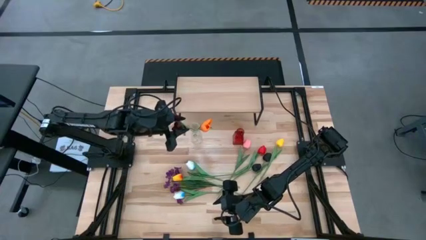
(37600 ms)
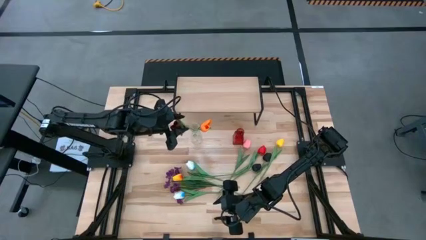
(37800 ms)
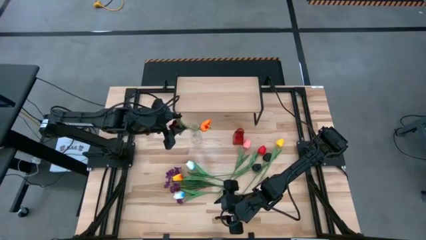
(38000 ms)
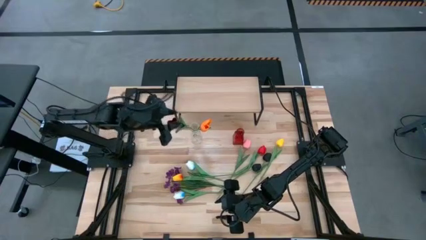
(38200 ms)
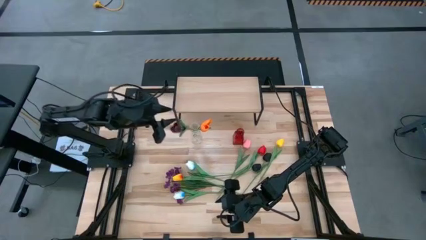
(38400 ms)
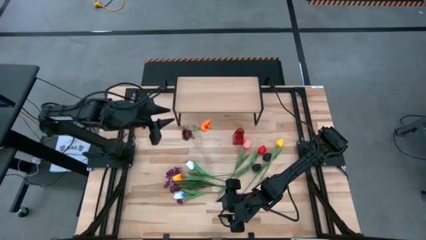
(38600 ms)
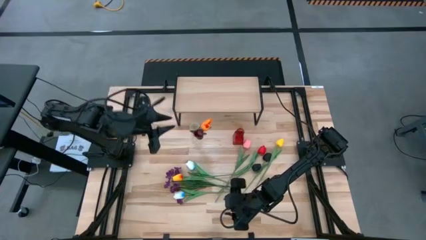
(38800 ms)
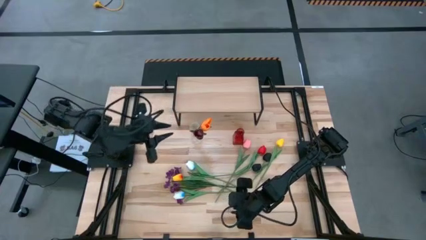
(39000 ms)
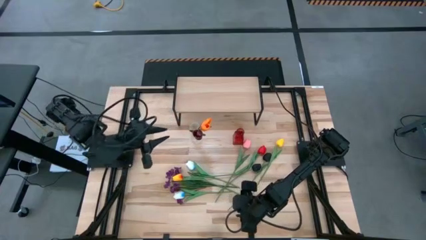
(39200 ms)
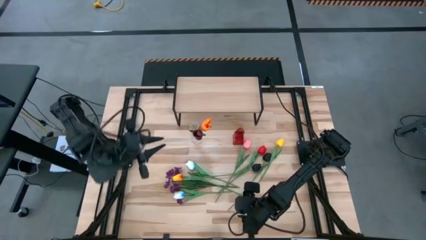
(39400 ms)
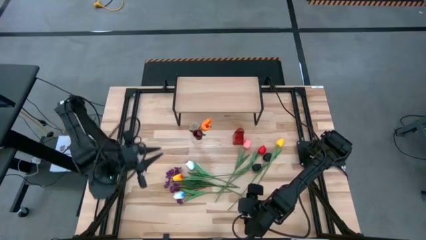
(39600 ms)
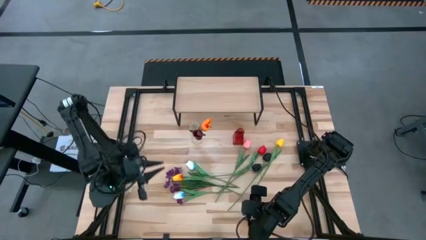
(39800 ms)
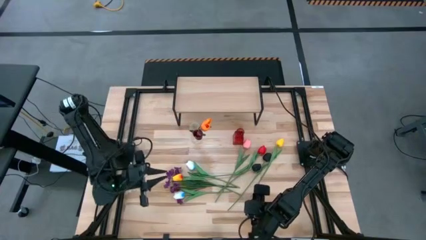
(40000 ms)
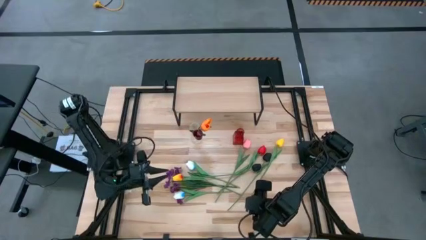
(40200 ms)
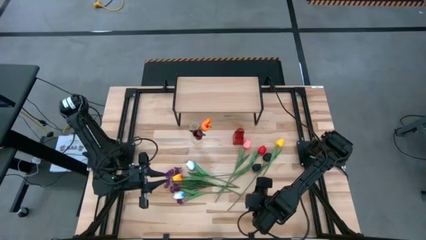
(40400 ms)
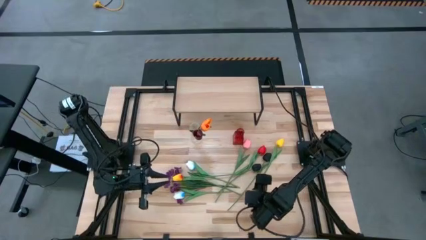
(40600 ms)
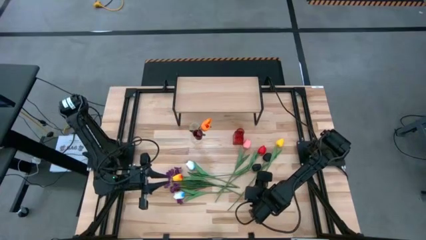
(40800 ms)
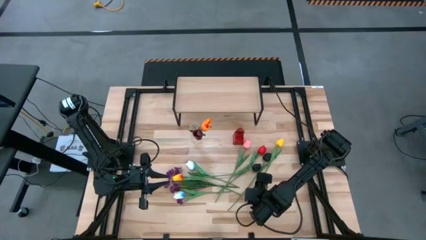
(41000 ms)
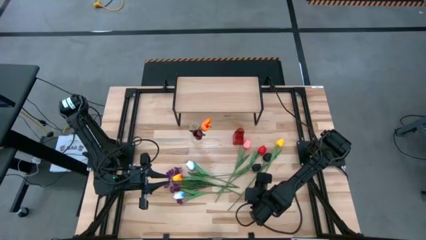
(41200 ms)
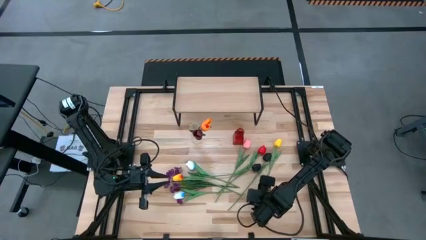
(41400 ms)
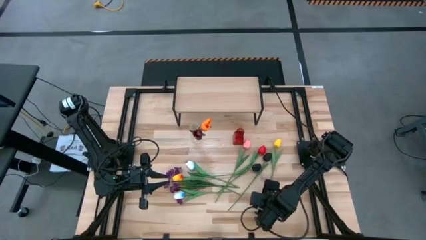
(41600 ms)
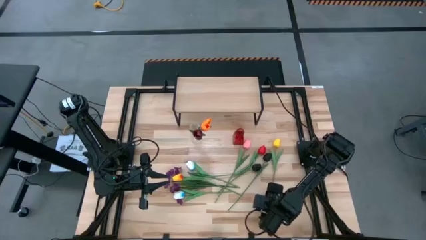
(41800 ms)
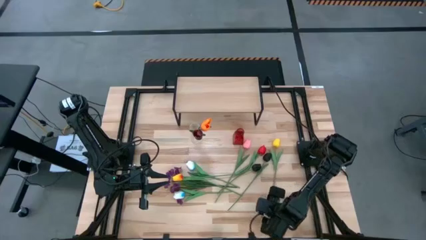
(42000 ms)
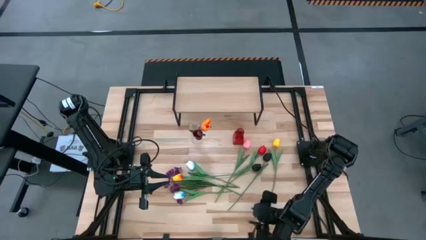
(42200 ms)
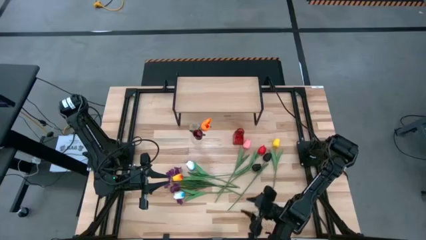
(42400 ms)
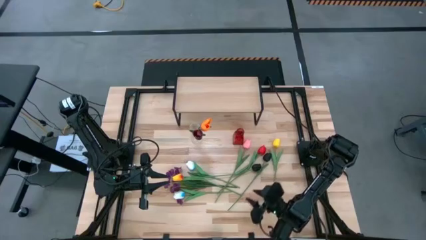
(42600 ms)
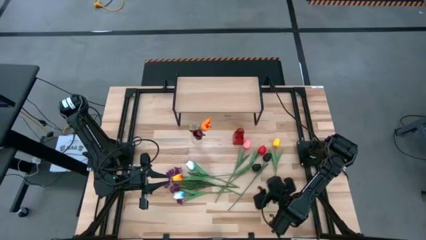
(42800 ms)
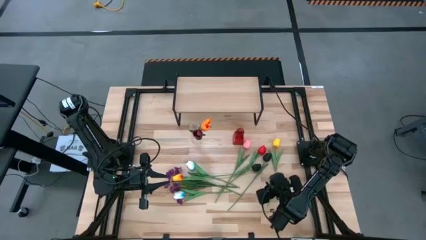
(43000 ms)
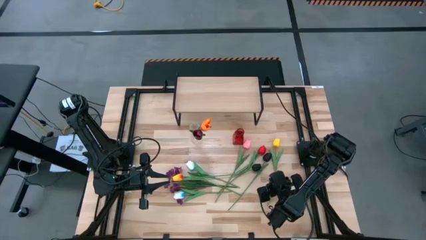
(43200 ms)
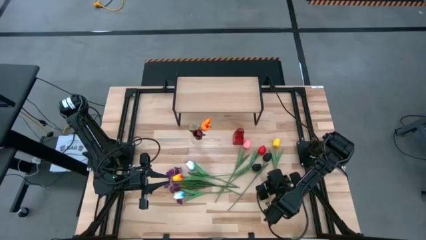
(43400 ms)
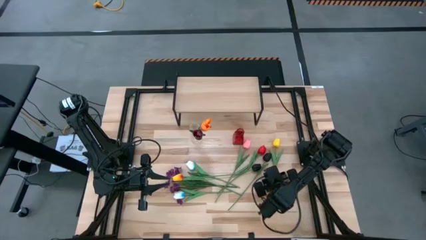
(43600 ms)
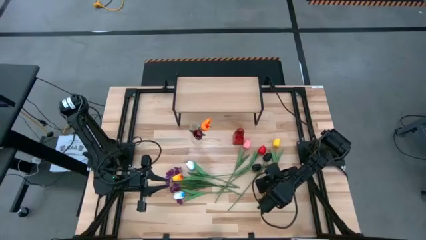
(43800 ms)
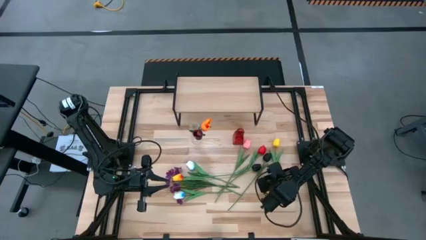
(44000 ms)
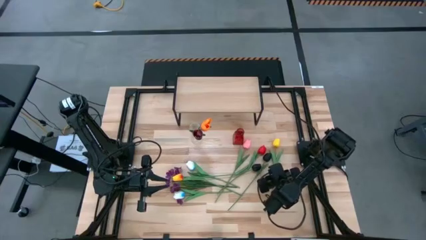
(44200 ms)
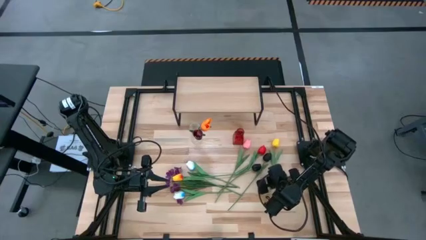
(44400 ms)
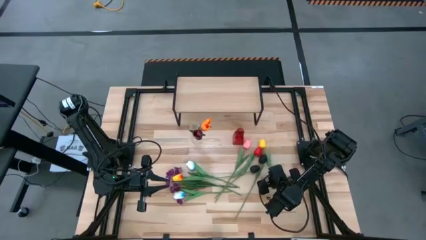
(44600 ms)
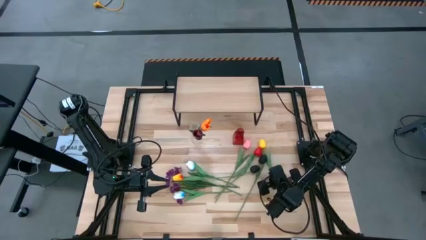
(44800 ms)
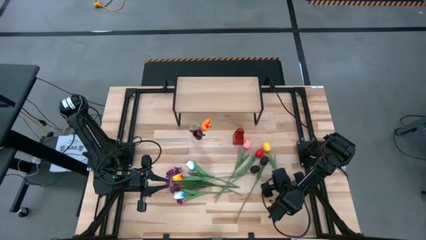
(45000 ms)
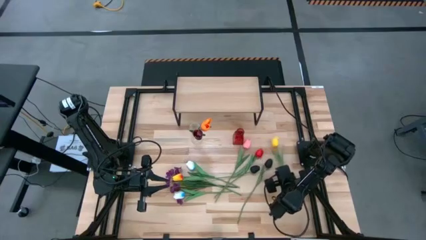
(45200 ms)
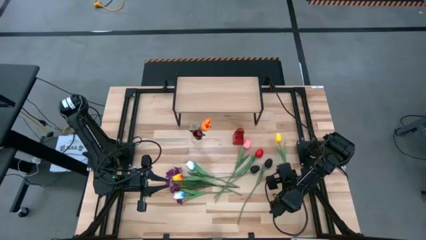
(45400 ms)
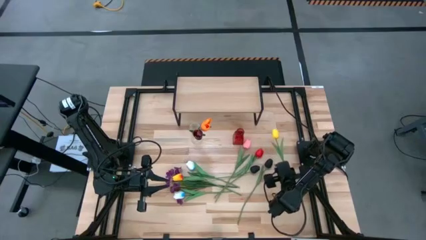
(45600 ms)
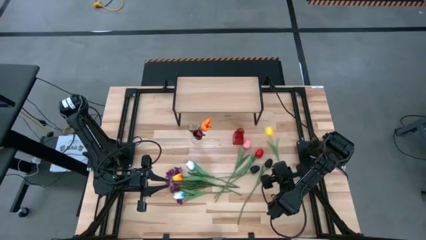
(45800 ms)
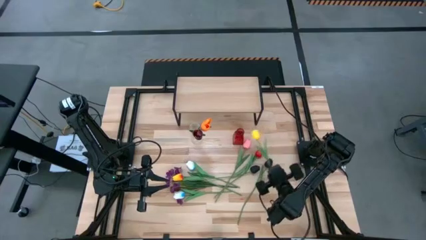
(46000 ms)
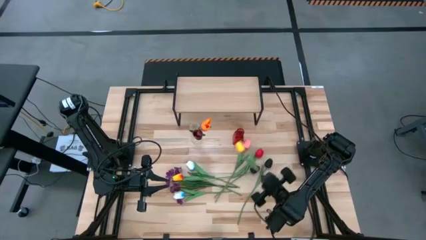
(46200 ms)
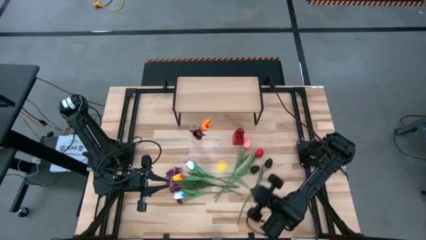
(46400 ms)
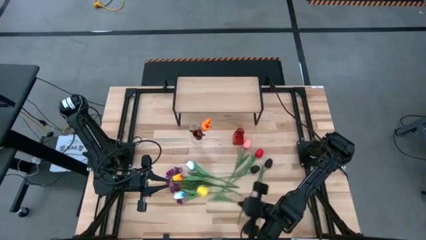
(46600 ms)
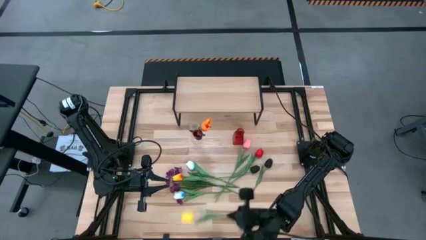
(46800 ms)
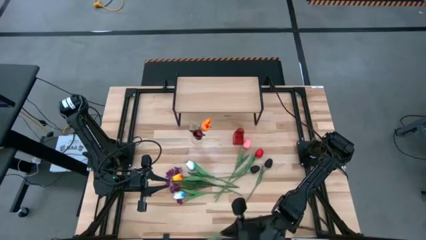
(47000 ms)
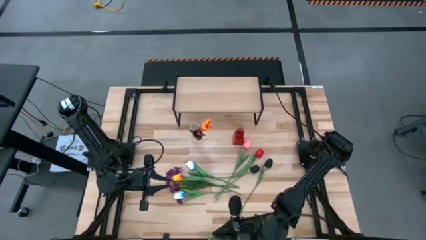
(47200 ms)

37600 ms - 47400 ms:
Task: Pick and place flowers into a vace then onto a shelf
Put the top yellow tulip into the transparent vase

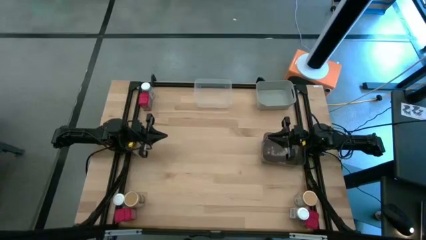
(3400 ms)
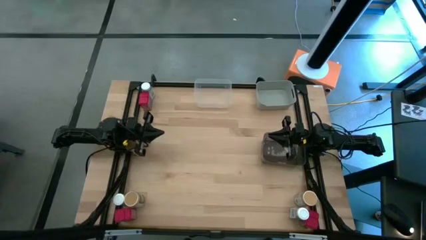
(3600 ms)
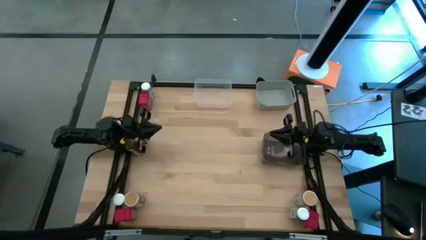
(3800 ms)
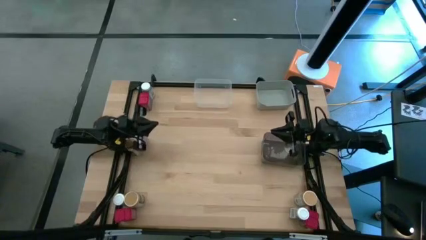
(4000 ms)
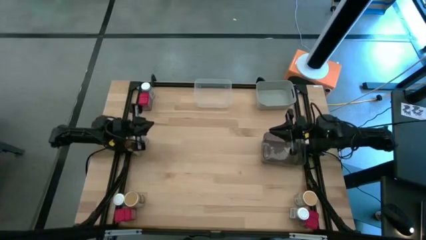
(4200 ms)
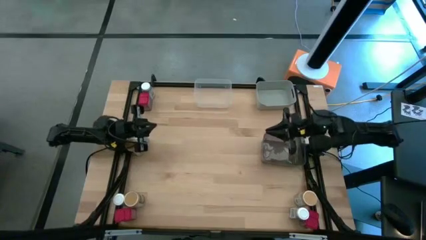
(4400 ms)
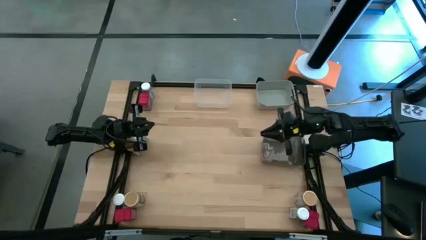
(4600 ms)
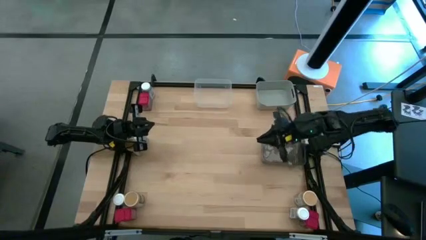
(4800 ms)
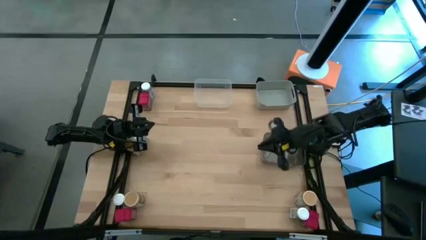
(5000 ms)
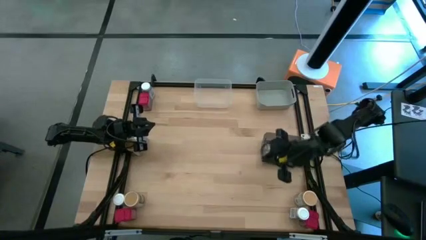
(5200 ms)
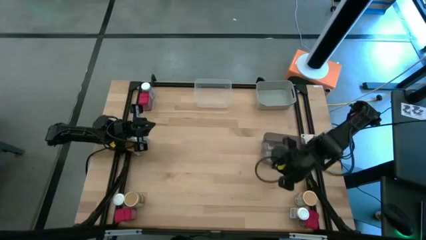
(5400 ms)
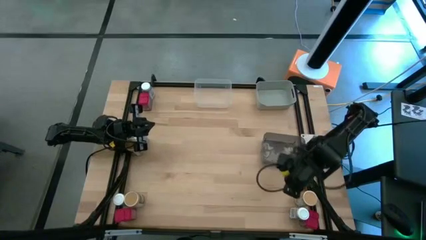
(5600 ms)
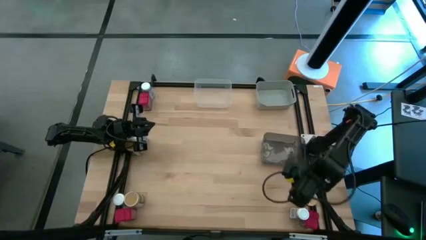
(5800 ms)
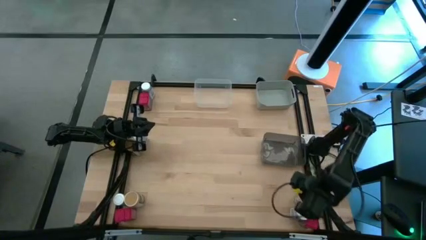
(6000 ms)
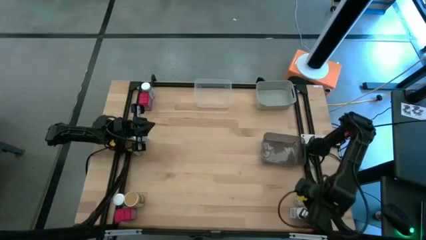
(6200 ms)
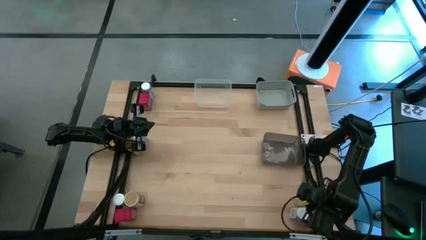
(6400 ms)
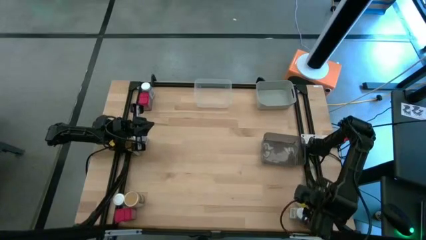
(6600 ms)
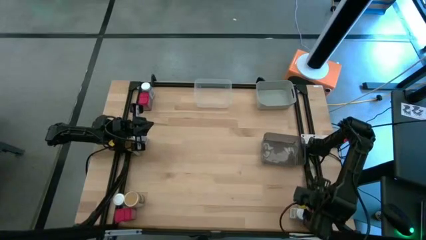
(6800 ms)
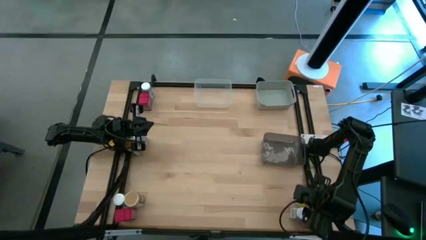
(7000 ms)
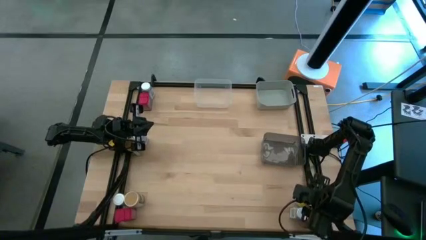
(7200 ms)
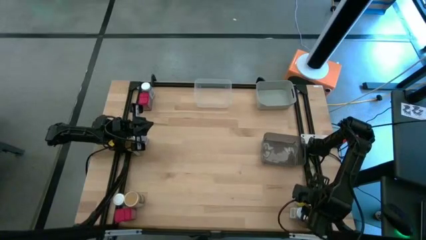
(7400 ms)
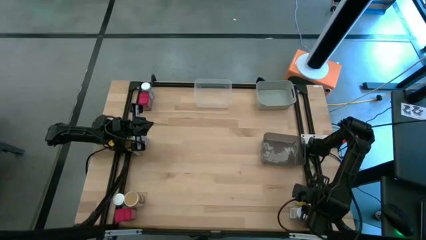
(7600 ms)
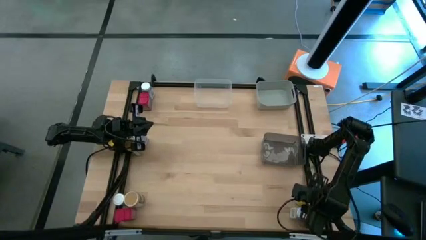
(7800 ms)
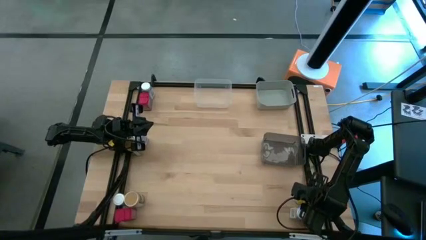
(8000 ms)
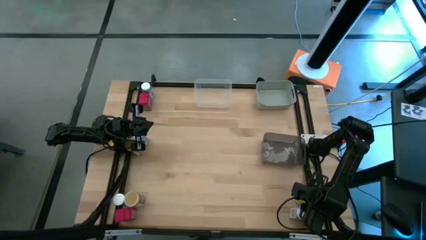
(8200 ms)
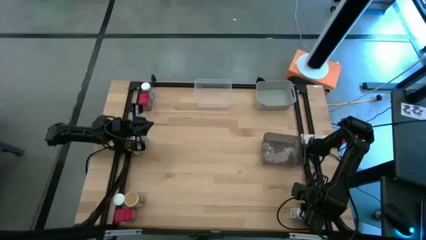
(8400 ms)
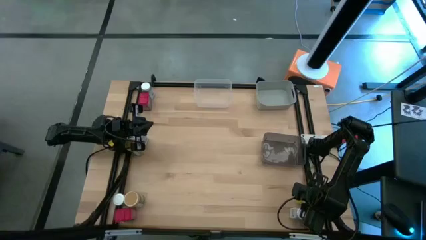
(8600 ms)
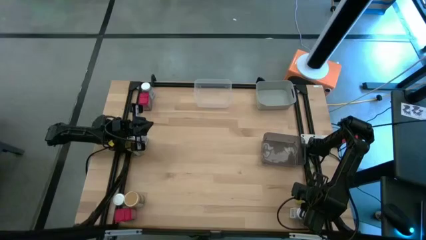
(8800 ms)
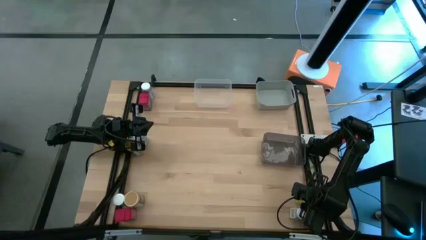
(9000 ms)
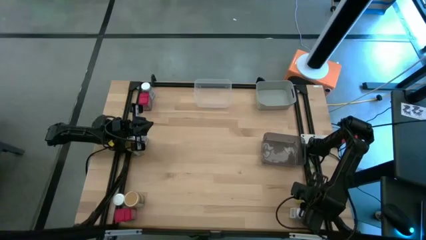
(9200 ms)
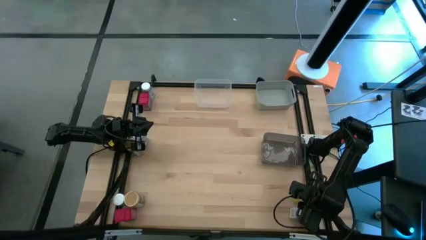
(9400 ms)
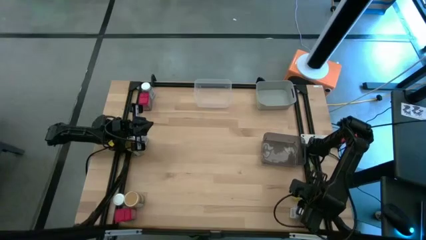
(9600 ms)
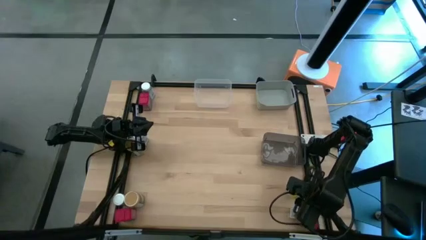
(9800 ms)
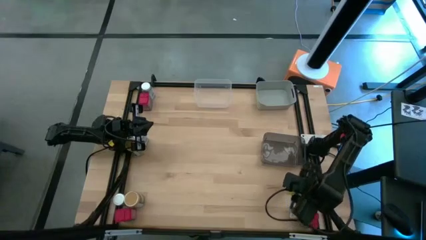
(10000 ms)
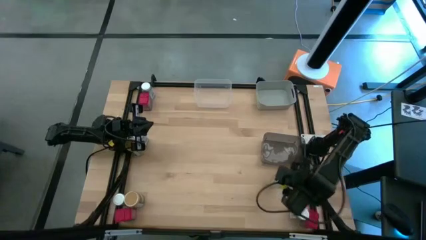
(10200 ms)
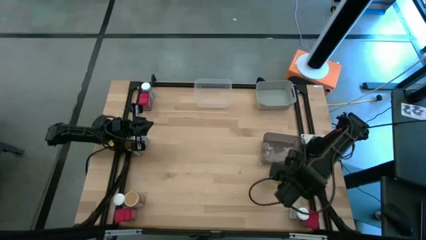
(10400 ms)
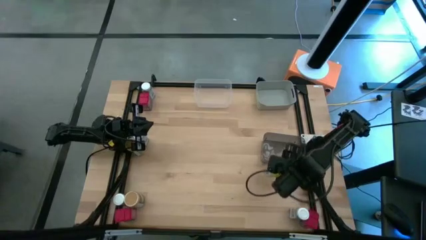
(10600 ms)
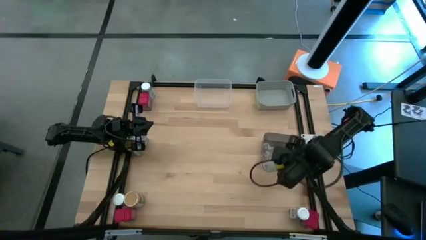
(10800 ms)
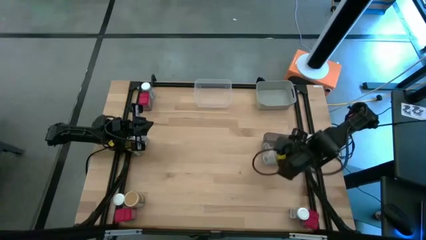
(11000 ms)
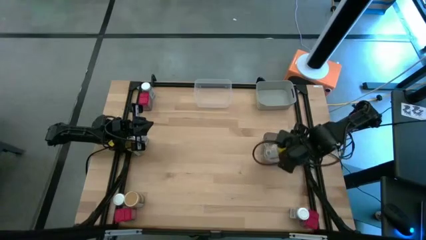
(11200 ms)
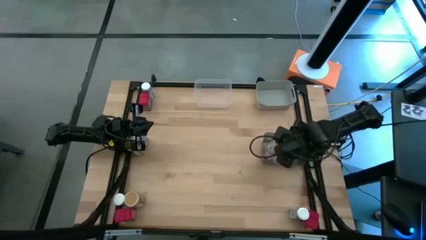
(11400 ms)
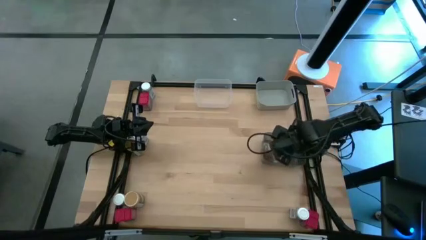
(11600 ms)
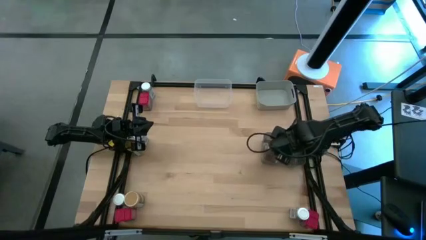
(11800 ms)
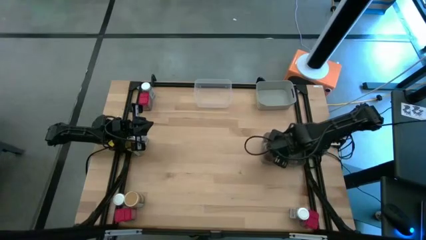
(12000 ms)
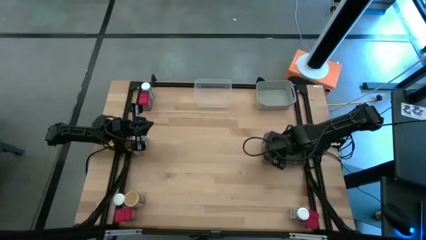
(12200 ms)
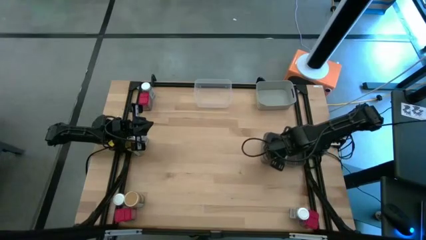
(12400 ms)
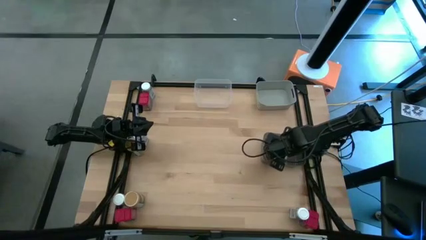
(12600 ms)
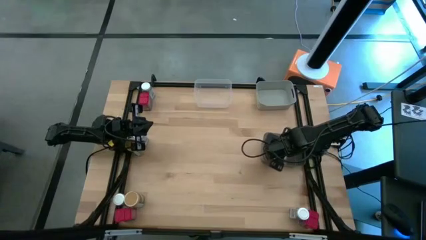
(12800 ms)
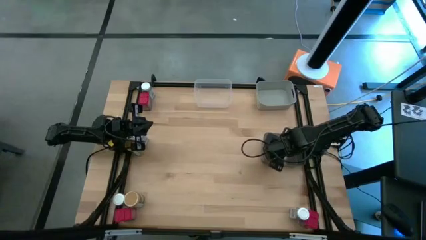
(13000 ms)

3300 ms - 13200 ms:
Task: Sort spices by type
Put the bottom right brown seasoning bottle into the black bin
